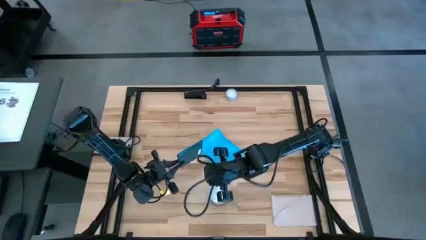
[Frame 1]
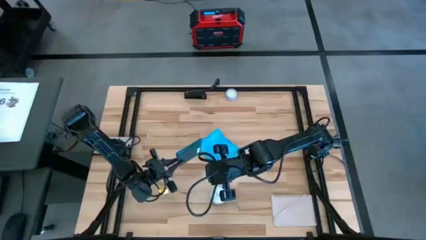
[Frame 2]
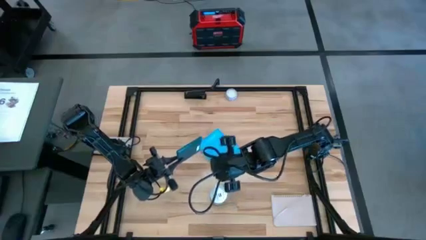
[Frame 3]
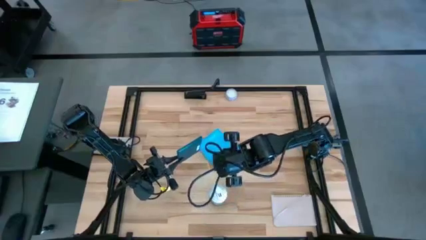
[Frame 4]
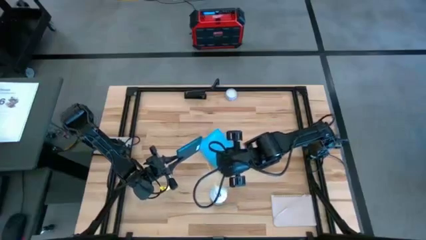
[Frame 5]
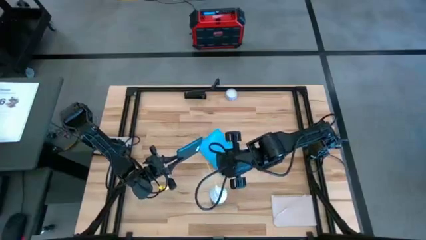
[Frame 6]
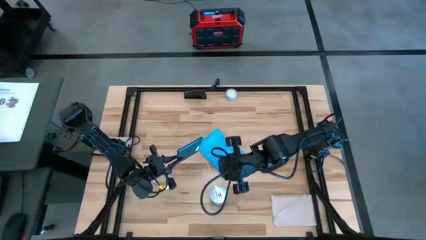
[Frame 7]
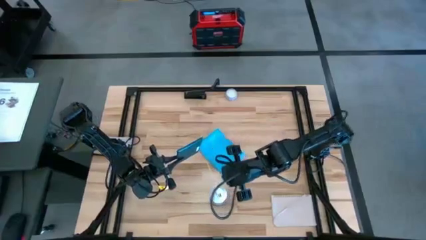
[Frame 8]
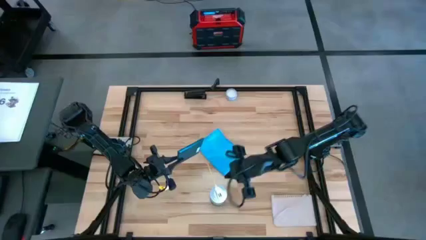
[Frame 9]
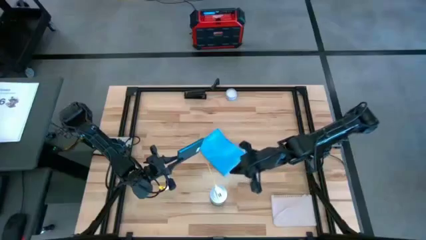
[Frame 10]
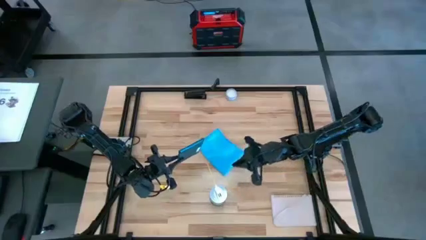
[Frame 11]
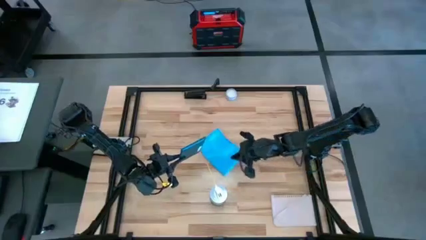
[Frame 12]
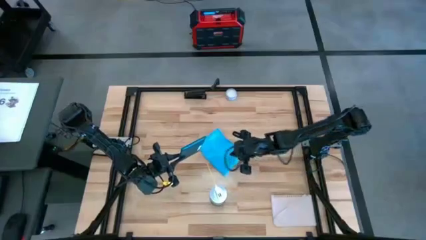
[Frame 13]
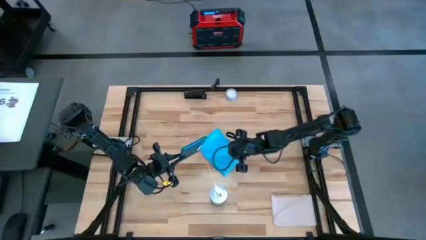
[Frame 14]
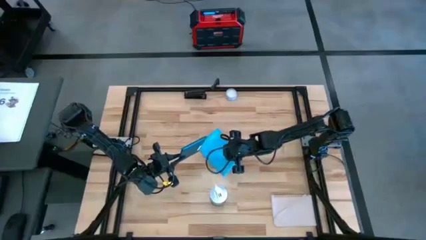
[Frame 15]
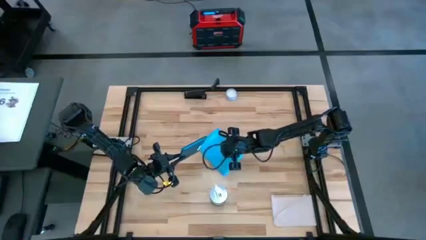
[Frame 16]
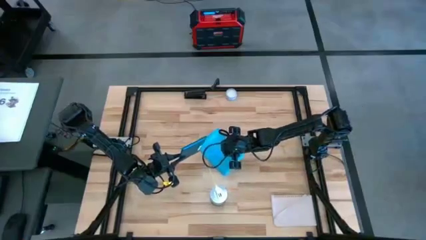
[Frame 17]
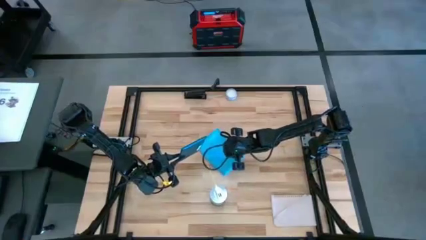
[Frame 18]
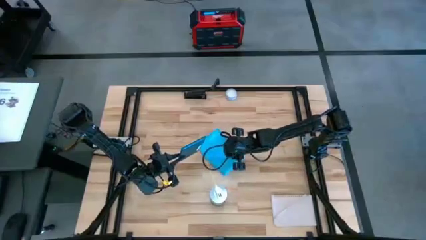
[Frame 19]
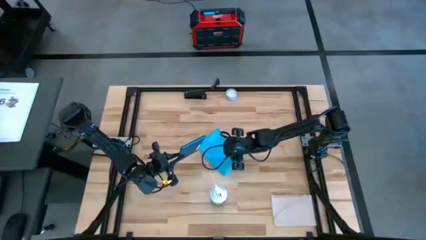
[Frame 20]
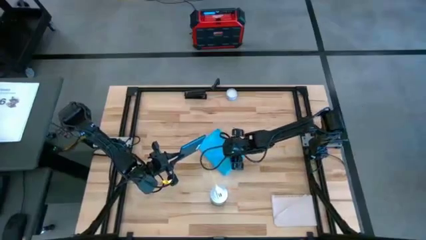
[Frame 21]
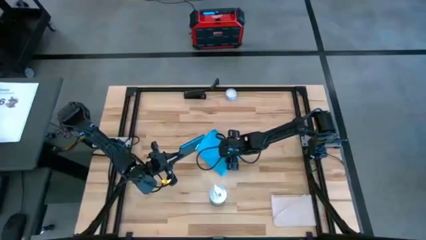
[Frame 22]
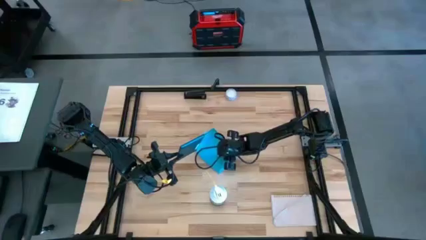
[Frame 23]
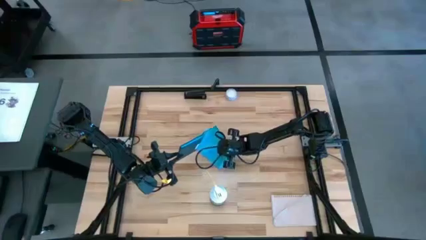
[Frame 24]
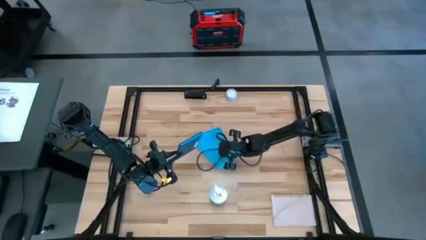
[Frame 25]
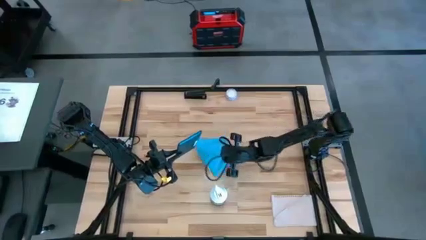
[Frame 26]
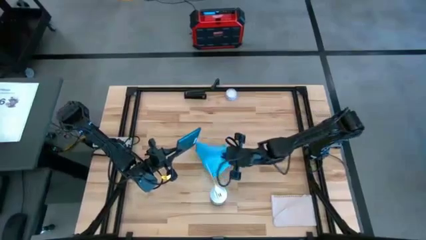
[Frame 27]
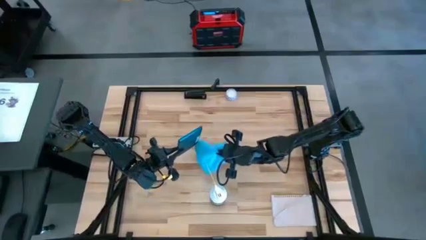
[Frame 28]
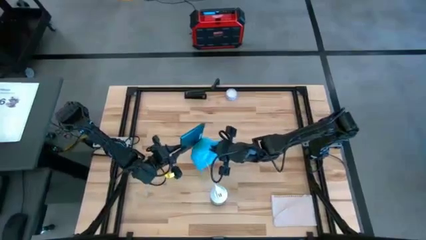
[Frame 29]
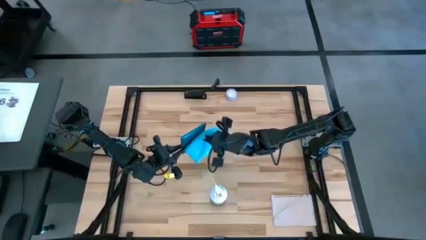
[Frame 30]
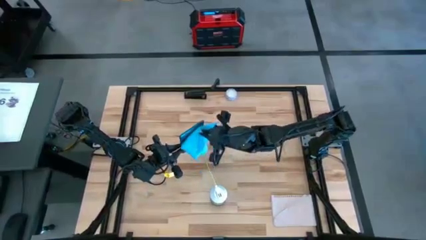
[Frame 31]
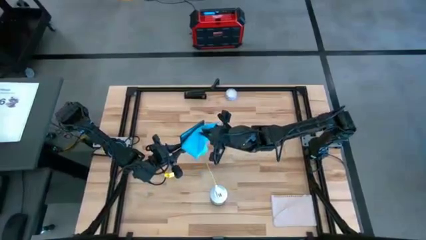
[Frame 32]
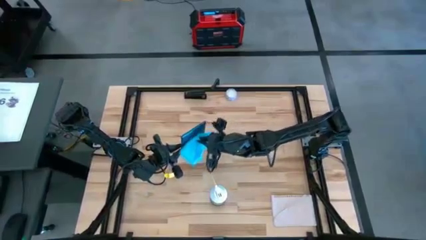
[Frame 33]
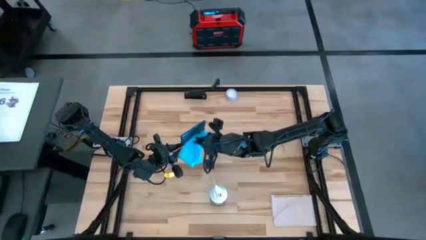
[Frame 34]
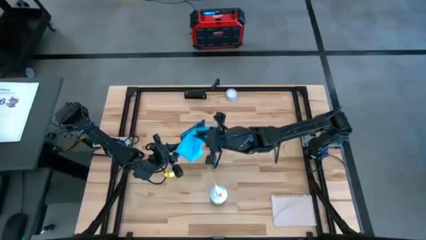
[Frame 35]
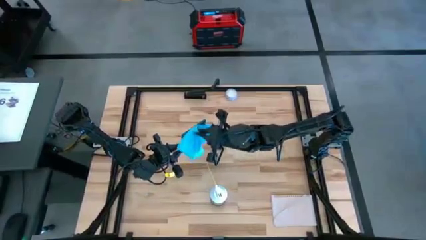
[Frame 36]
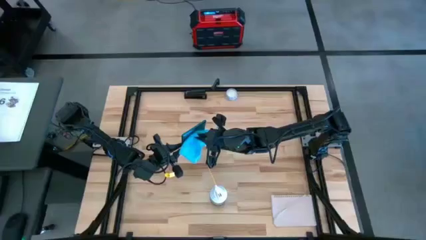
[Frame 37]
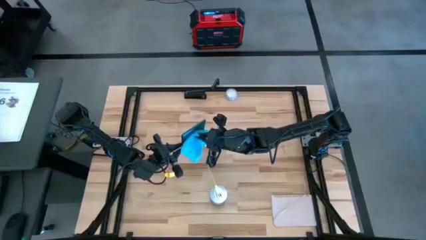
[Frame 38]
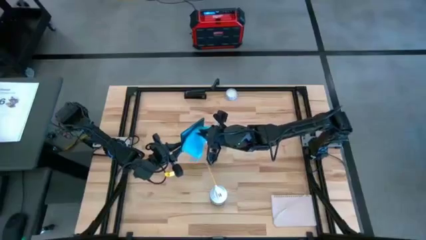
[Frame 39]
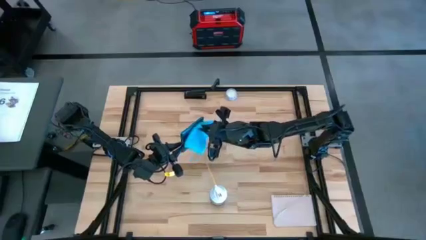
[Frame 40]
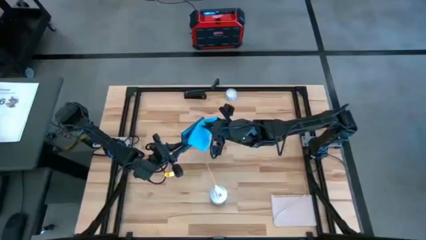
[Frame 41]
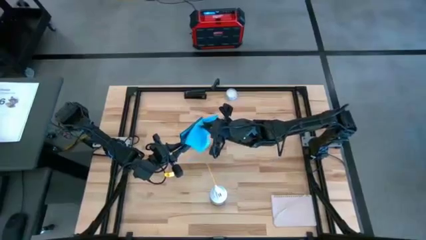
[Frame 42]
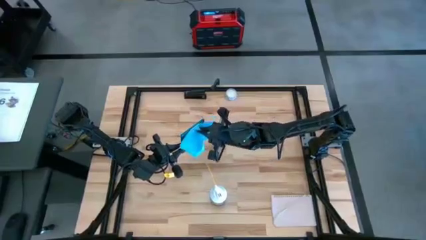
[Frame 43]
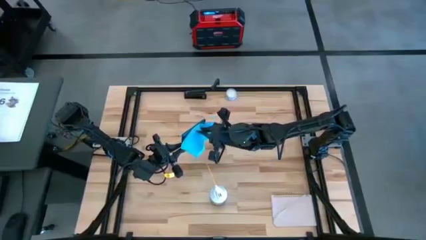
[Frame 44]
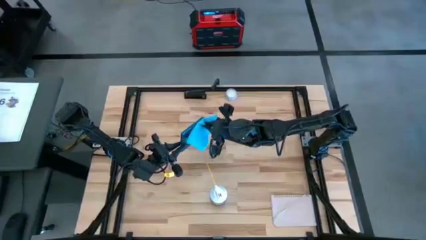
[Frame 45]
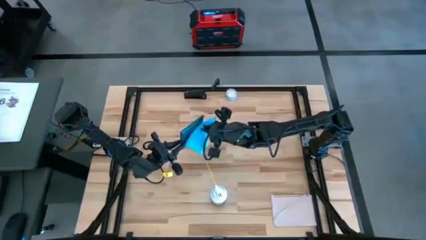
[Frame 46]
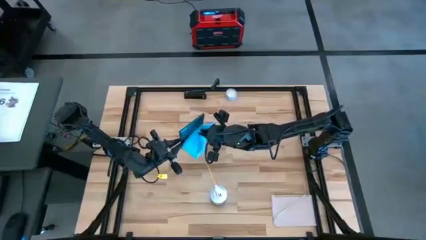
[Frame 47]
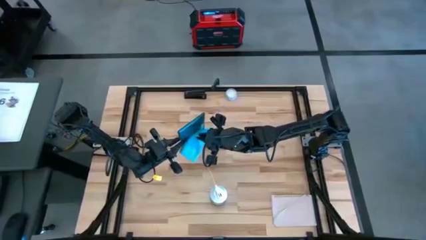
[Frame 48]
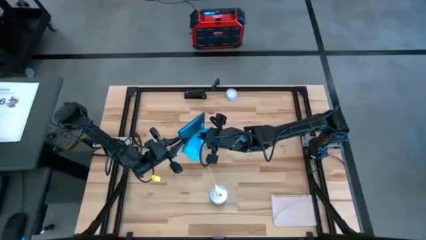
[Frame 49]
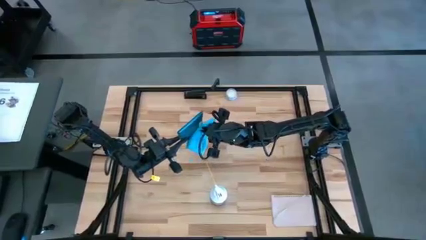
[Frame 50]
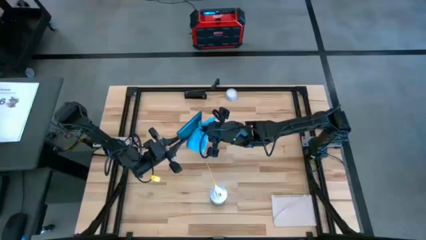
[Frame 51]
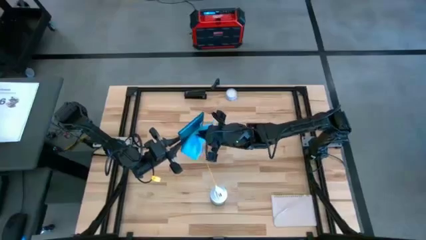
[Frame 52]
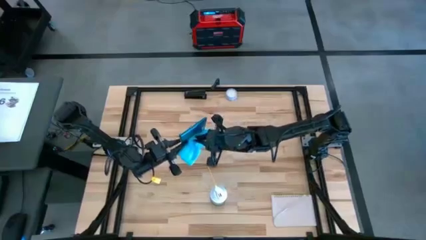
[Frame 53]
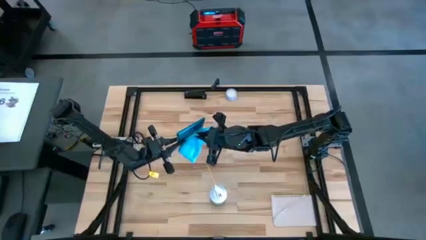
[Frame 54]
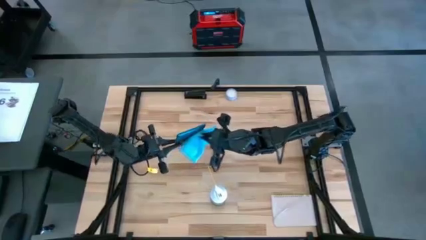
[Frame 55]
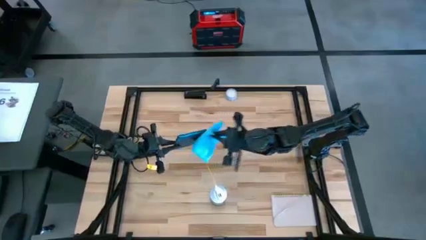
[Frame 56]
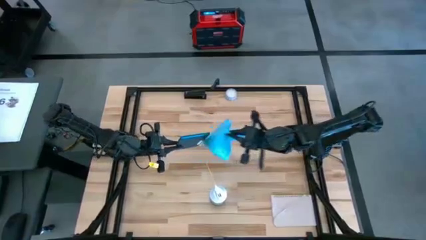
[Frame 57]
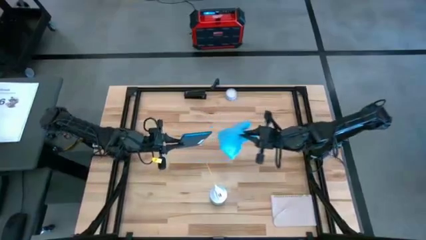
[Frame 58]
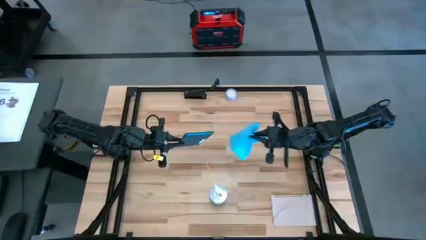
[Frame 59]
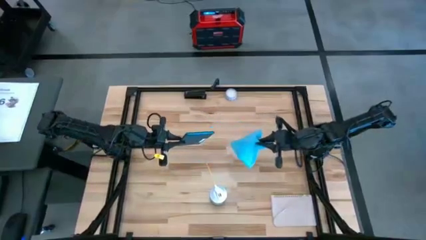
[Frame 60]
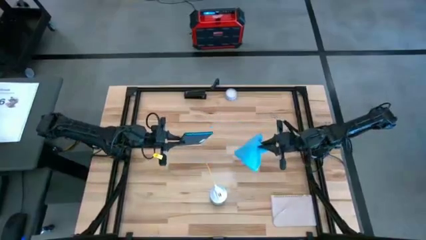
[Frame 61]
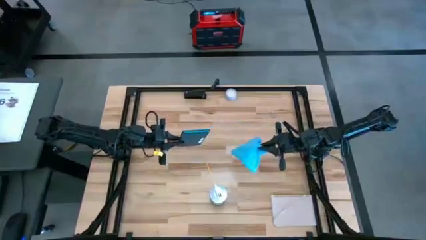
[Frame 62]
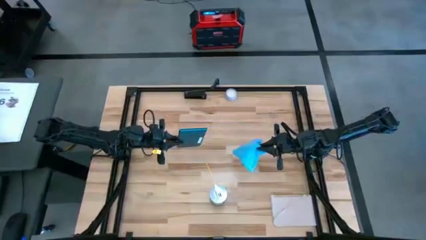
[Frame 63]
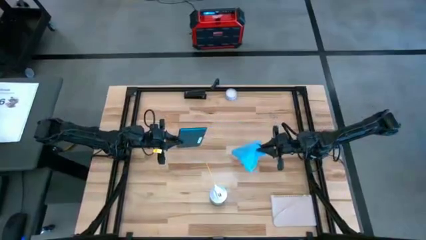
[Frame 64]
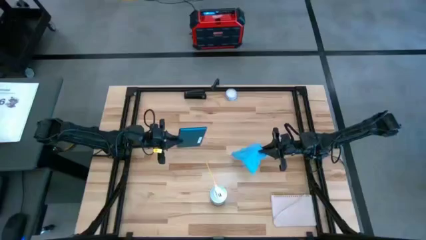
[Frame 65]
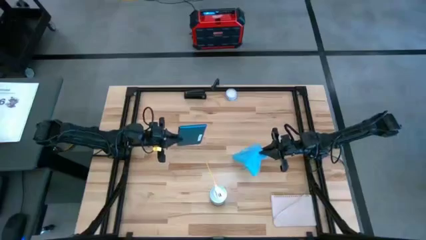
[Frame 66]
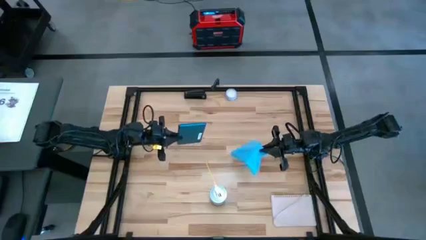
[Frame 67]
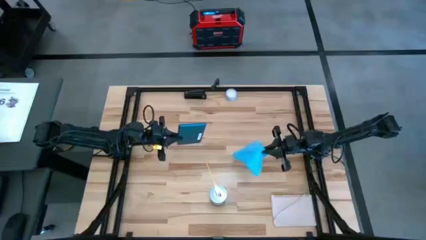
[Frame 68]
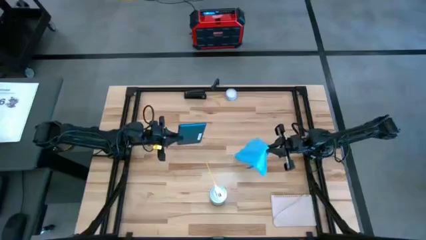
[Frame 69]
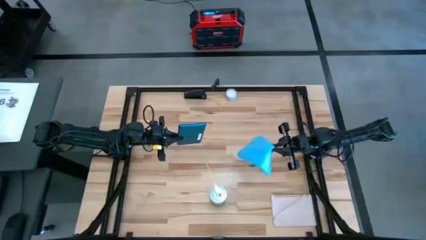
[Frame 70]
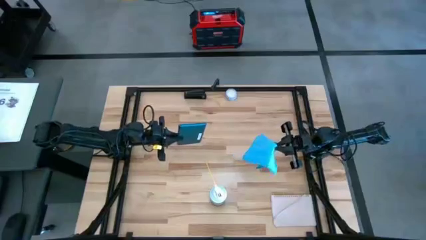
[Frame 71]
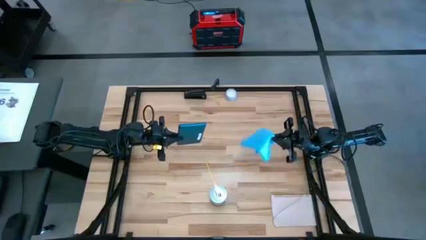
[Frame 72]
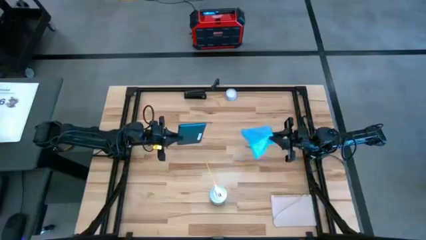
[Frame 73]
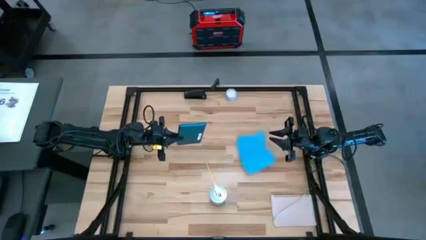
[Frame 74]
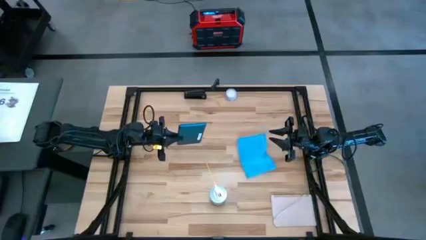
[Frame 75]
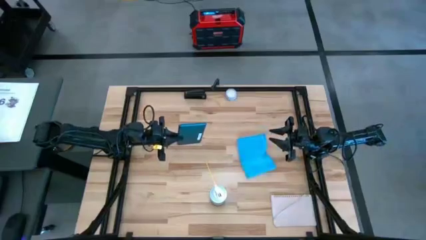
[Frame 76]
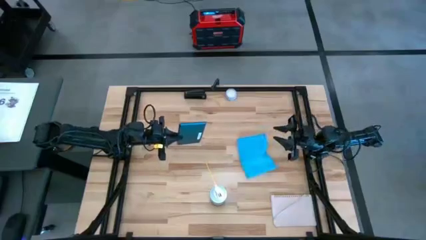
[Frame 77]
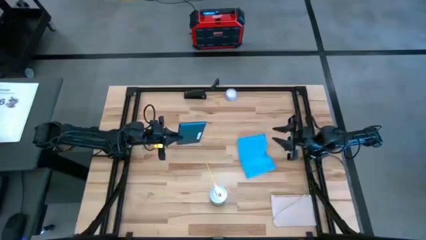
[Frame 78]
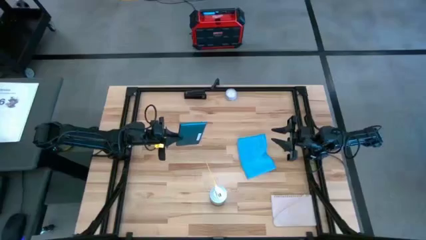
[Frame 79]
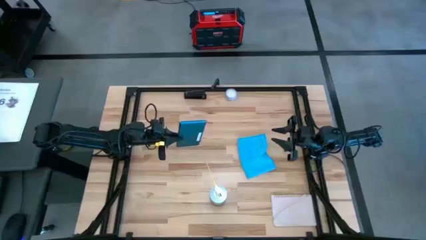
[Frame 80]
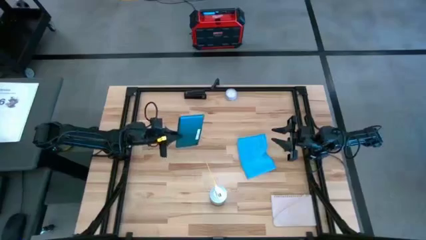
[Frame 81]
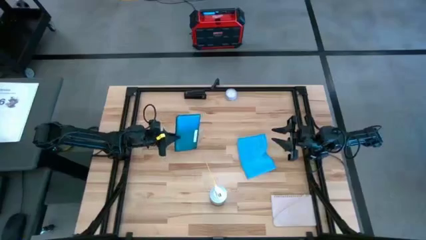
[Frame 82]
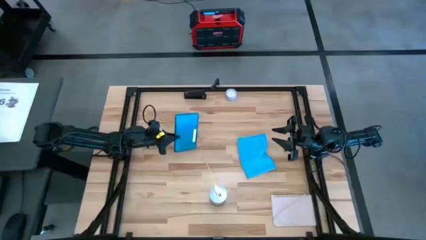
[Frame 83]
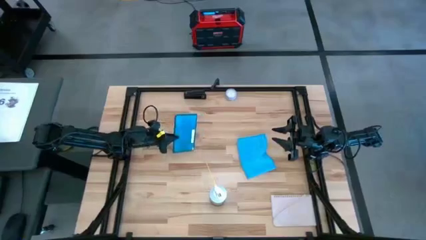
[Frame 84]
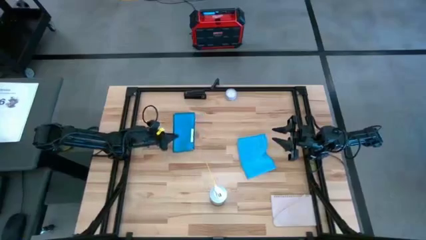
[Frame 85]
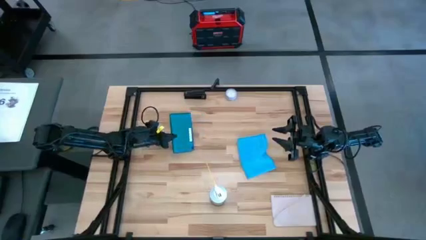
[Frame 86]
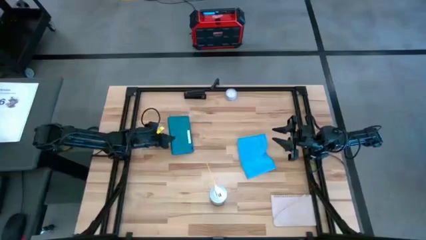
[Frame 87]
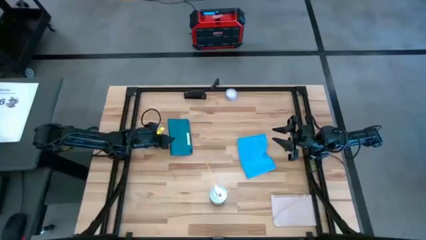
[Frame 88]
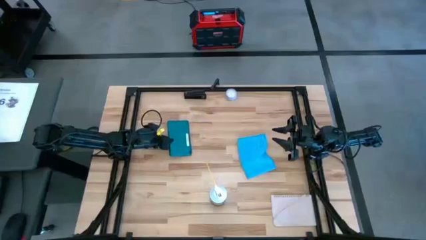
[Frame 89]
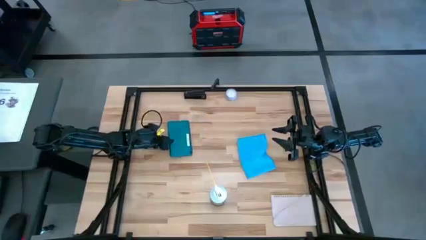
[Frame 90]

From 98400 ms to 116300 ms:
Task: Apply microfiber cloth
Wipe the back of the black tablet using the blue microfiber cloth
